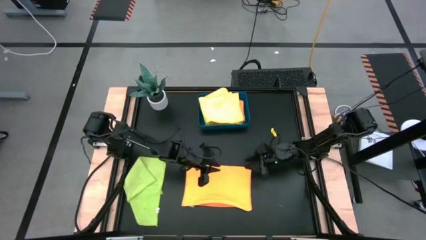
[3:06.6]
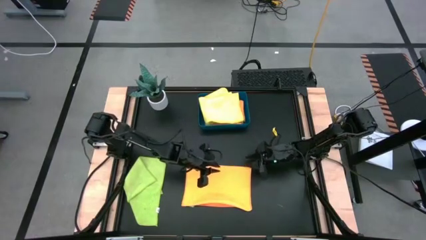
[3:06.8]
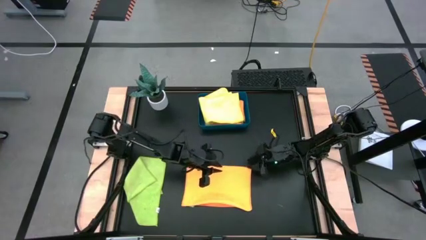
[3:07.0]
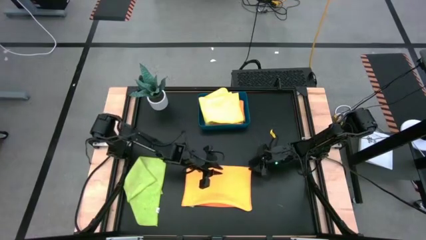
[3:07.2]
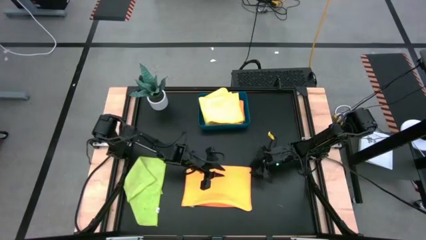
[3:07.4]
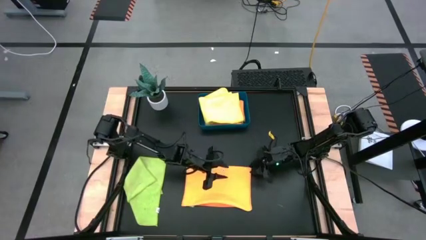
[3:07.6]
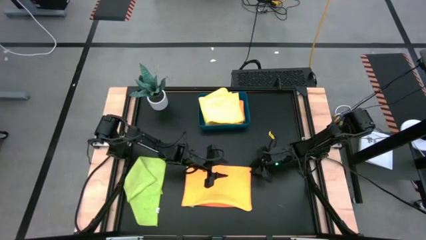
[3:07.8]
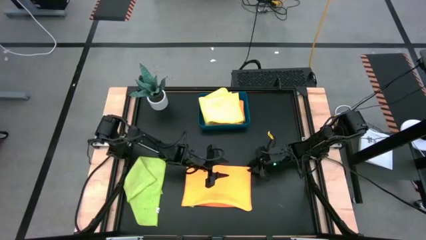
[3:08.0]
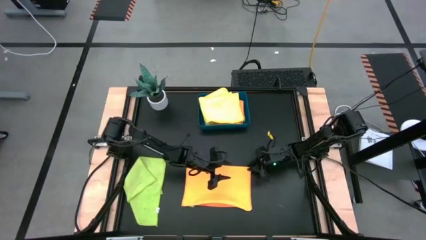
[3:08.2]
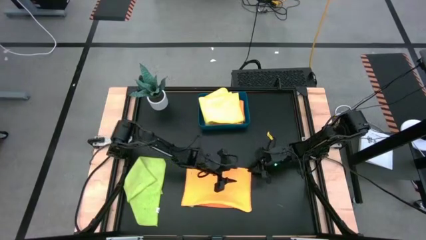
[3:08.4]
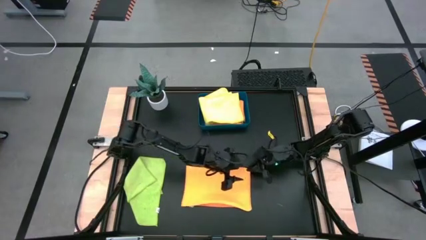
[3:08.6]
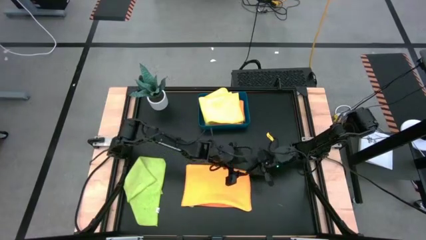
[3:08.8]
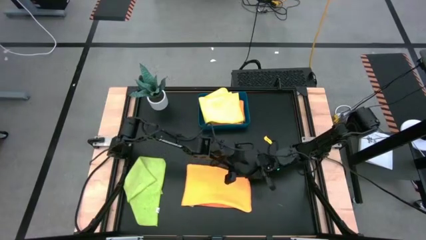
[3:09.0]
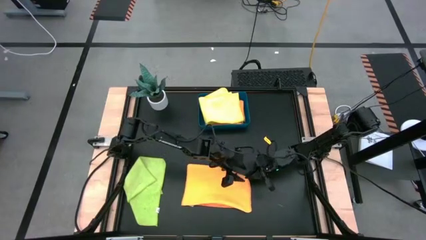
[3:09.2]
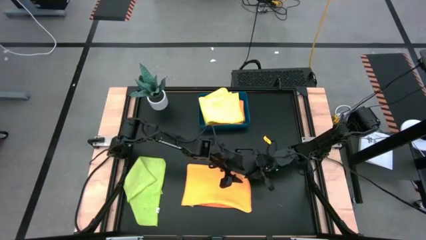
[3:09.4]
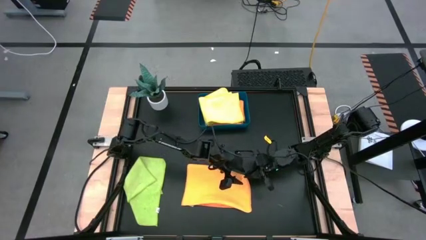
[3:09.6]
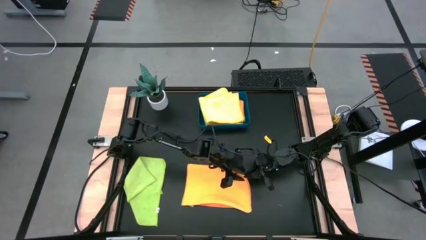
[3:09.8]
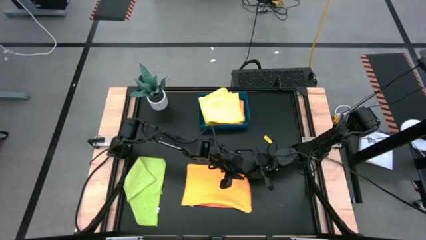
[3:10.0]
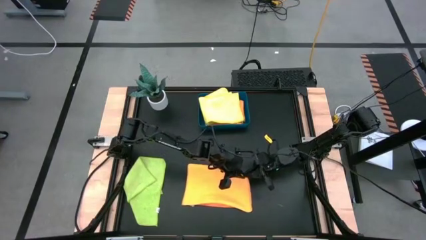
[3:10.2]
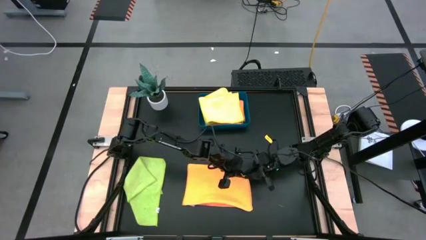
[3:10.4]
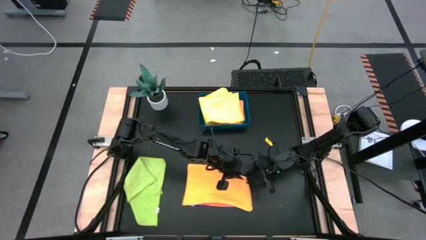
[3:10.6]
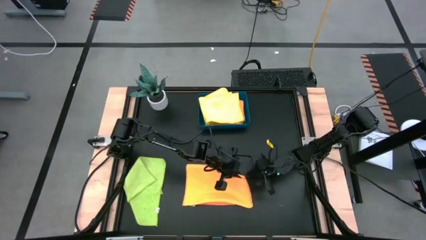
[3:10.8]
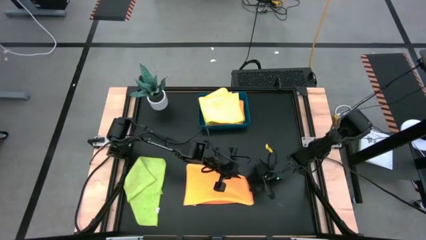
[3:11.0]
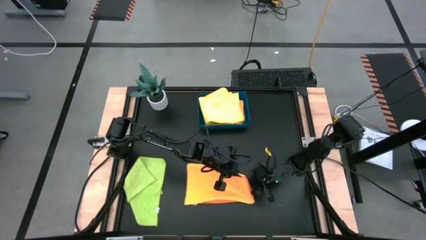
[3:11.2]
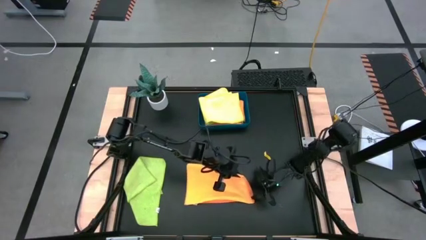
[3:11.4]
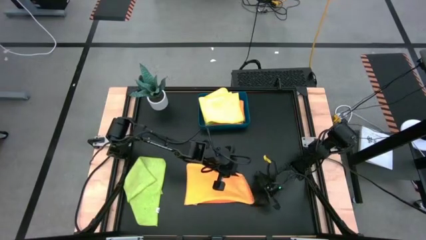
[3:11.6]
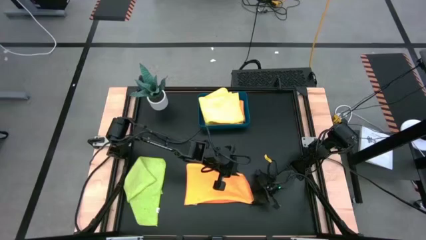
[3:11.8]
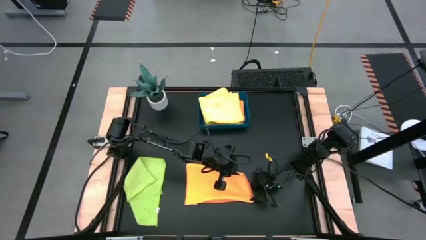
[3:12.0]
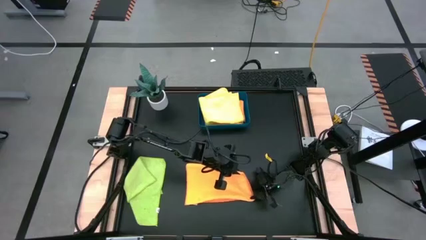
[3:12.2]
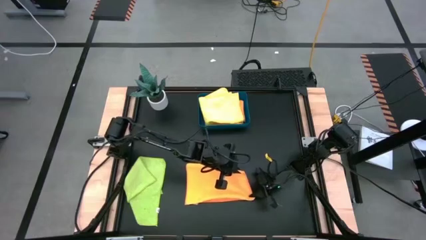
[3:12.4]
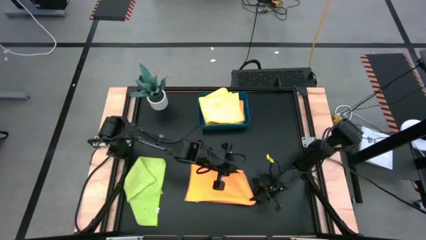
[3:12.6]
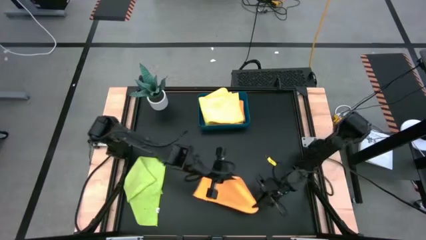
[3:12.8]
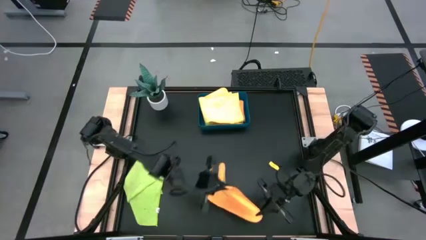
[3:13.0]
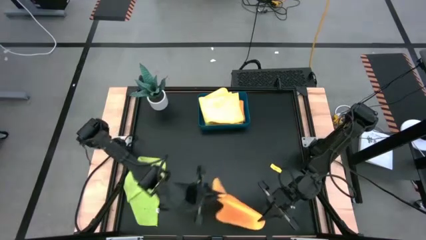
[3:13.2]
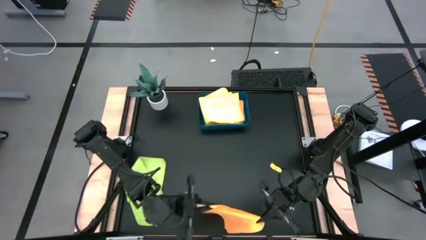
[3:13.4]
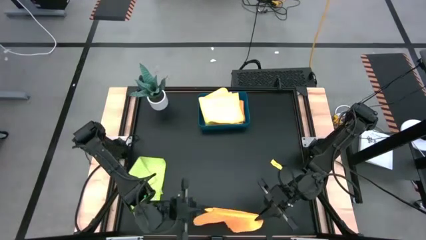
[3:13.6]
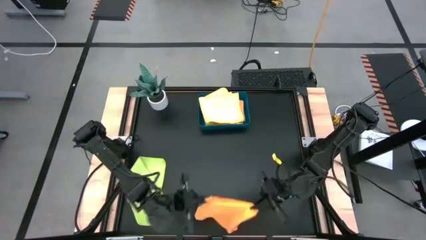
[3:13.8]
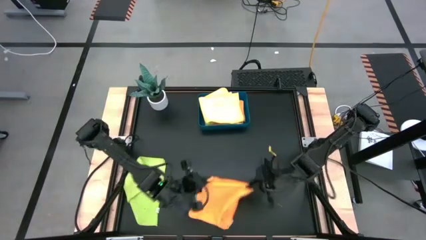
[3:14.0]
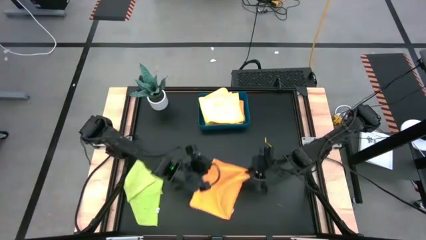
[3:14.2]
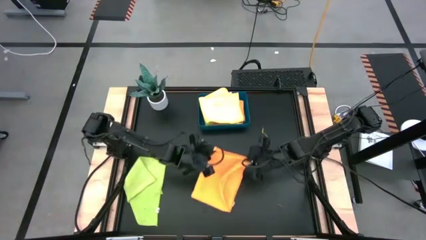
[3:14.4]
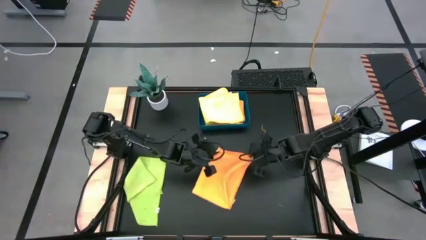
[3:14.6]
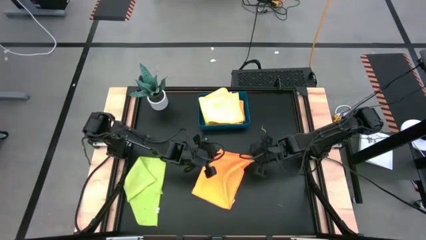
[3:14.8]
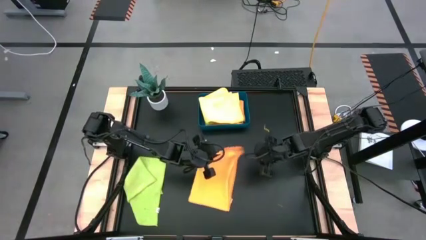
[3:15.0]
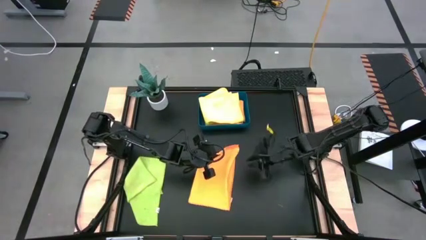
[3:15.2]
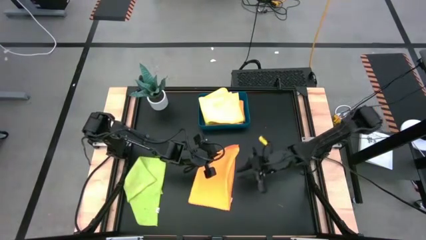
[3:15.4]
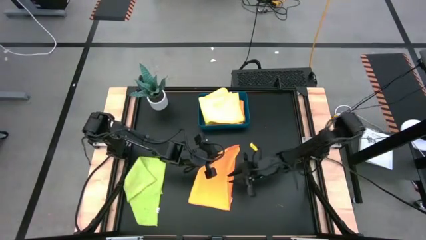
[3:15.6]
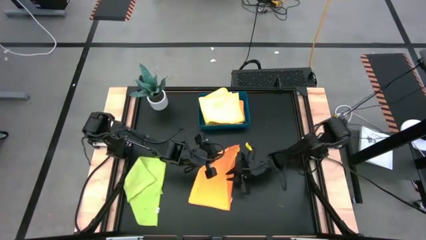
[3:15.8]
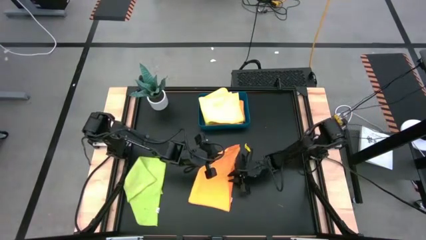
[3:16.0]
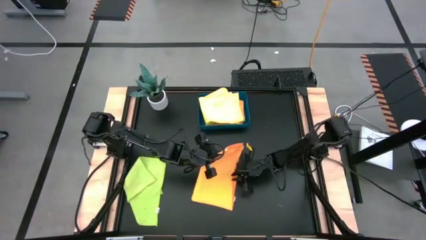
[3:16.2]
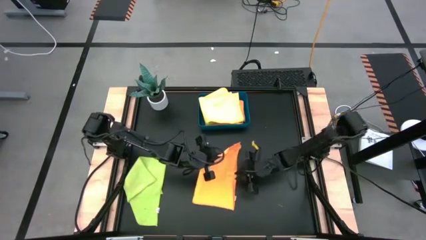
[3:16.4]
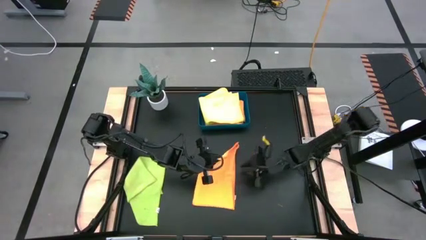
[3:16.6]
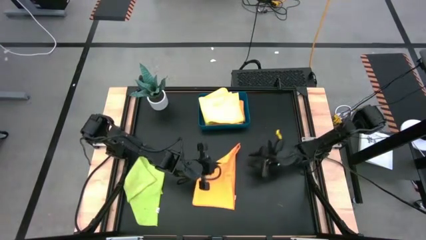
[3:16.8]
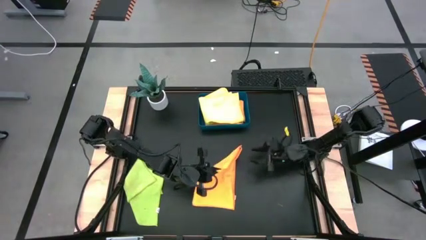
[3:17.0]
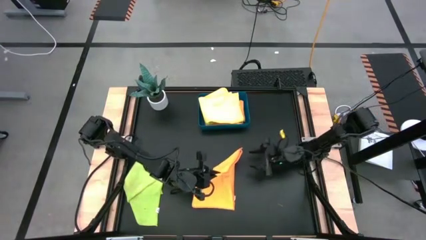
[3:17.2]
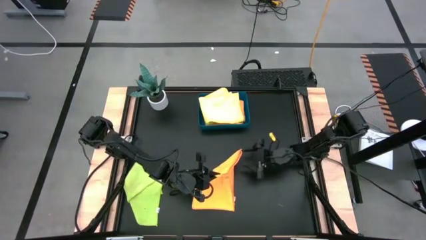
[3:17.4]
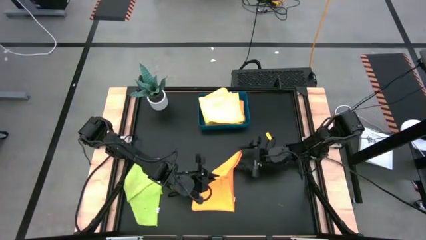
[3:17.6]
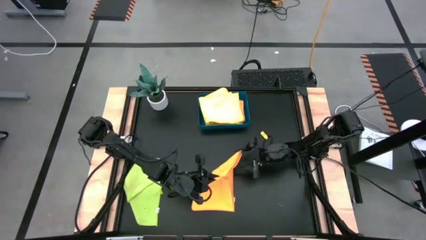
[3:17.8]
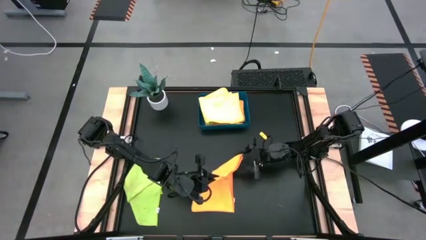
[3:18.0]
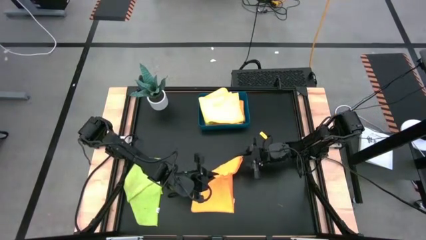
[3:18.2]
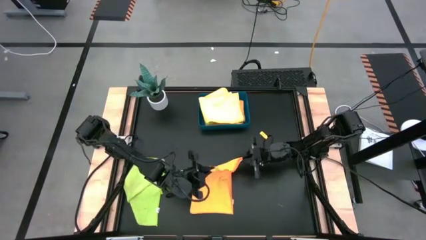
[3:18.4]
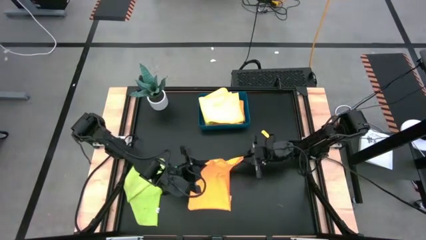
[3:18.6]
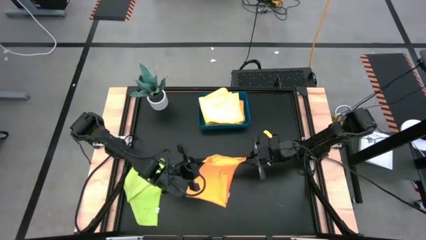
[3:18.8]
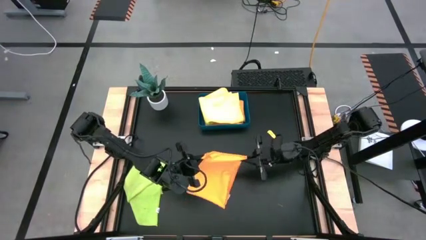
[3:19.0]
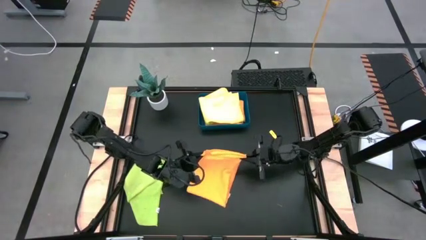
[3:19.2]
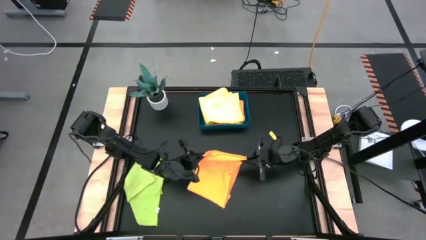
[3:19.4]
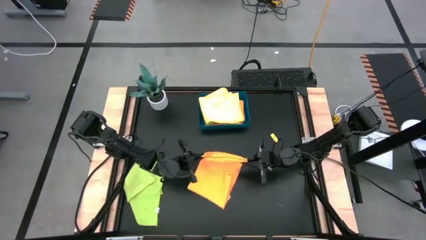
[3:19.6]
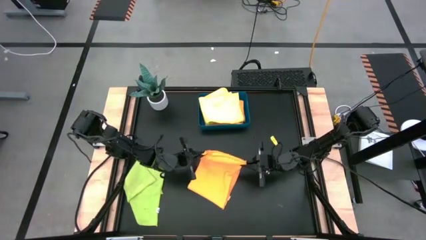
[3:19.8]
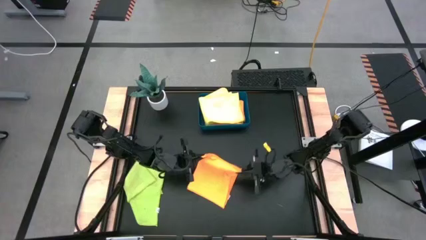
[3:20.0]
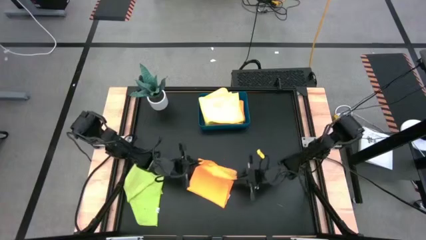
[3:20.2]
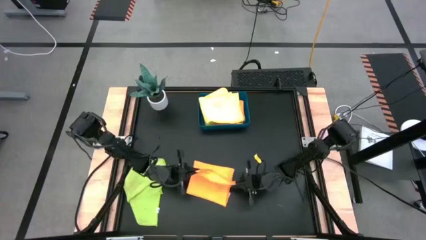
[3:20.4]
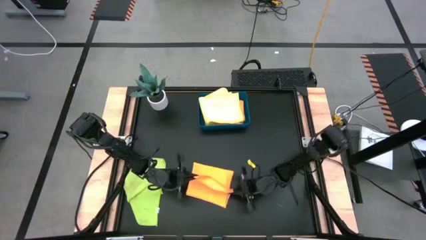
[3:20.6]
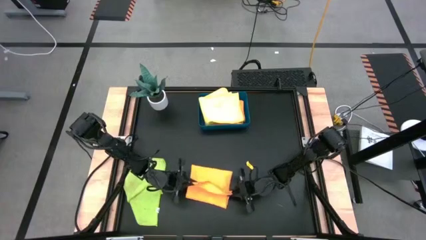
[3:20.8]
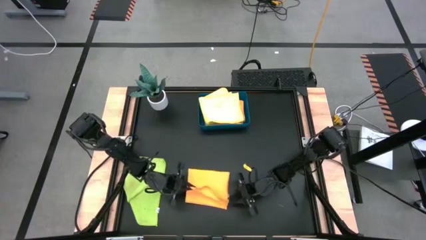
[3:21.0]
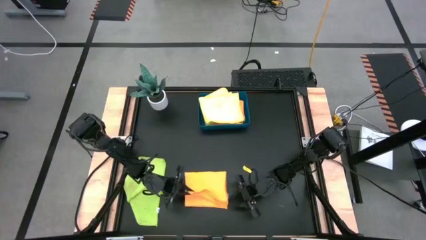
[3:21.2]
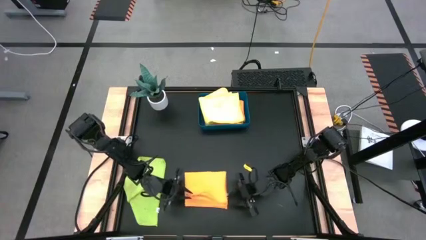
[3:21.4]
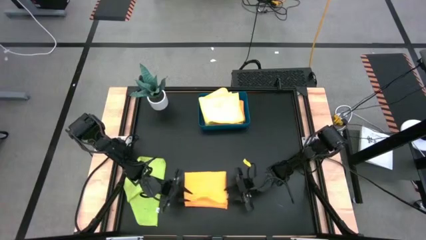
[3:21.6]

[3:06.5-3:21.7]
Task: Fold microfiber towels
Fold the orange microfiber cloth
